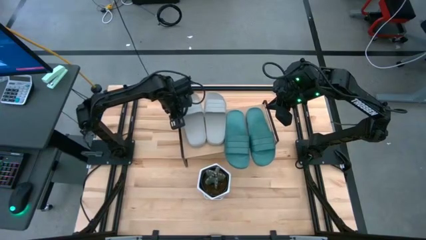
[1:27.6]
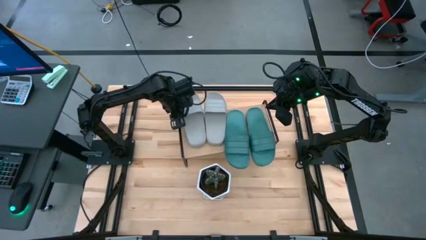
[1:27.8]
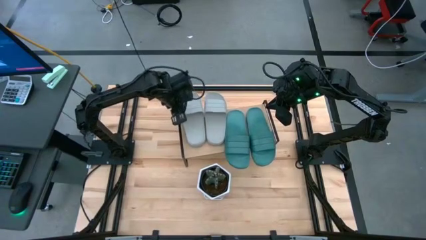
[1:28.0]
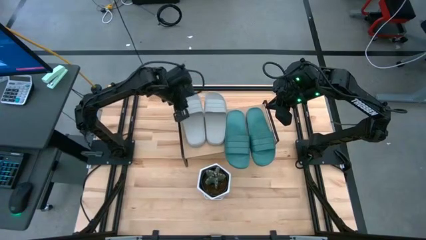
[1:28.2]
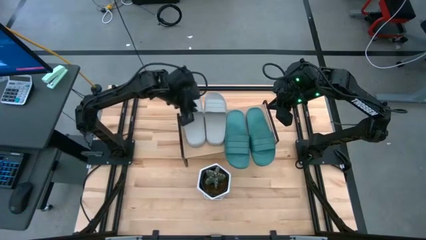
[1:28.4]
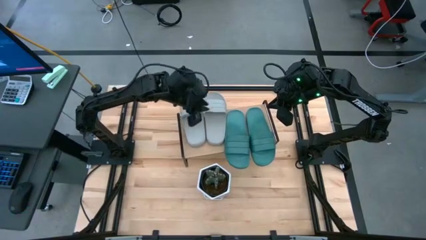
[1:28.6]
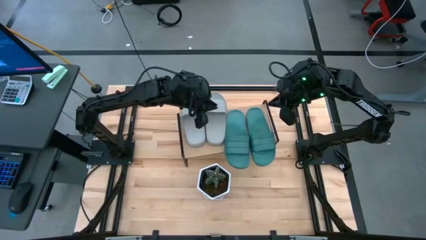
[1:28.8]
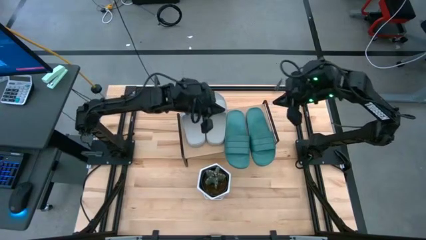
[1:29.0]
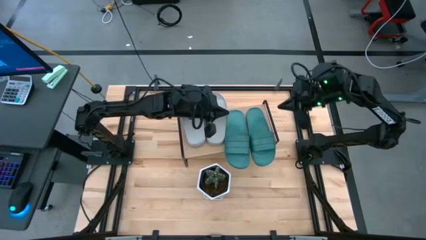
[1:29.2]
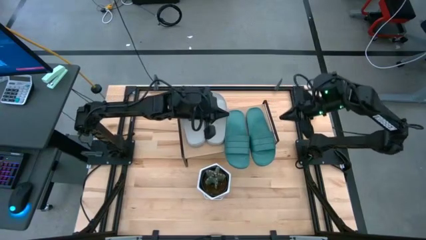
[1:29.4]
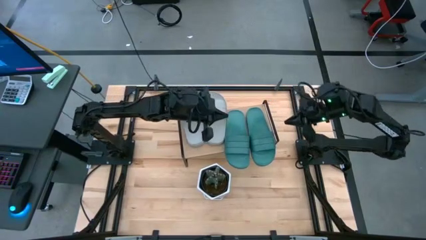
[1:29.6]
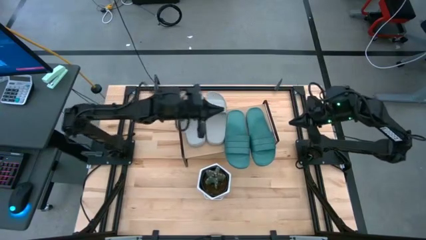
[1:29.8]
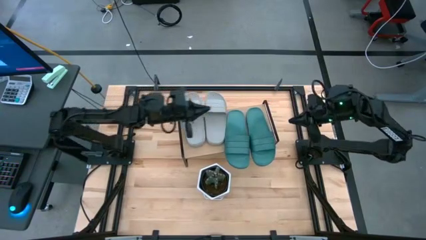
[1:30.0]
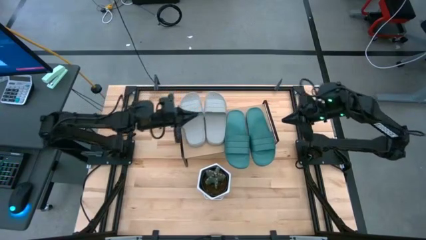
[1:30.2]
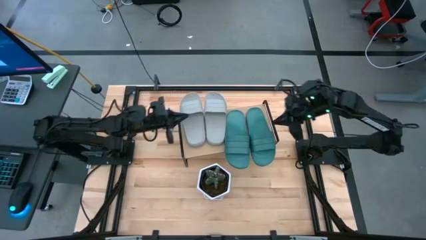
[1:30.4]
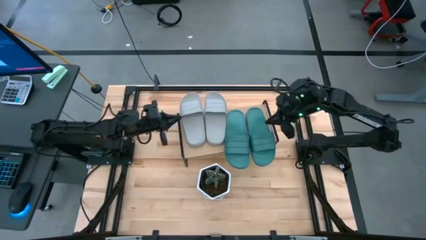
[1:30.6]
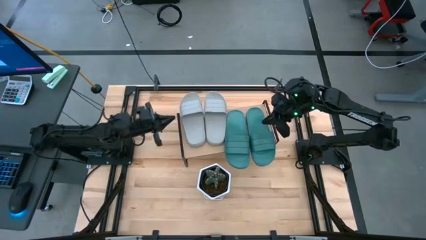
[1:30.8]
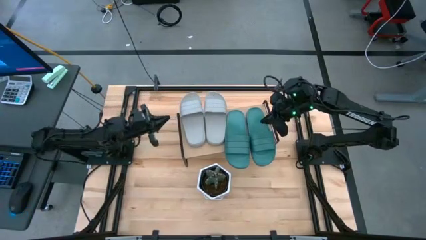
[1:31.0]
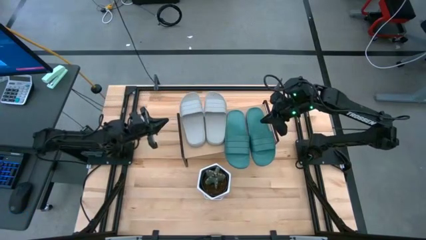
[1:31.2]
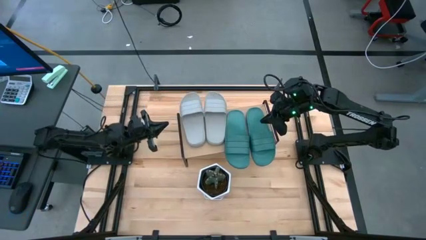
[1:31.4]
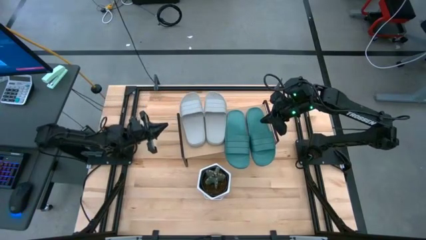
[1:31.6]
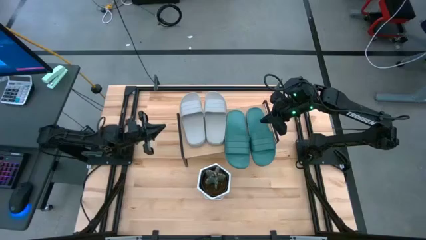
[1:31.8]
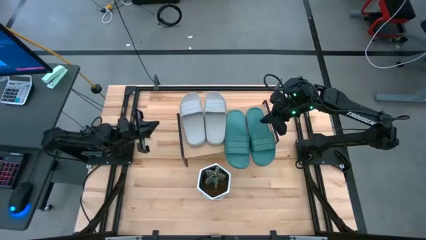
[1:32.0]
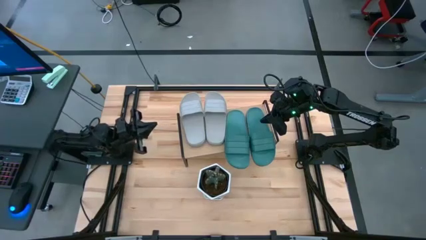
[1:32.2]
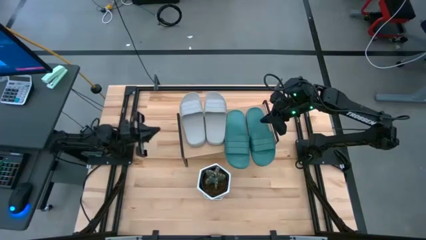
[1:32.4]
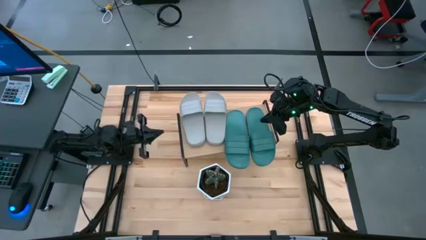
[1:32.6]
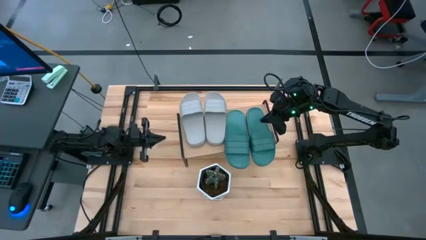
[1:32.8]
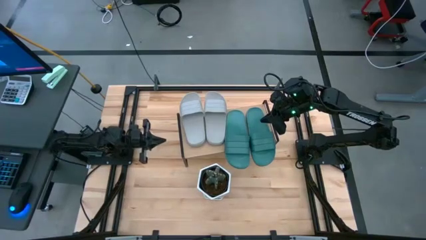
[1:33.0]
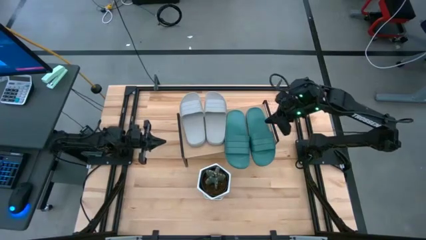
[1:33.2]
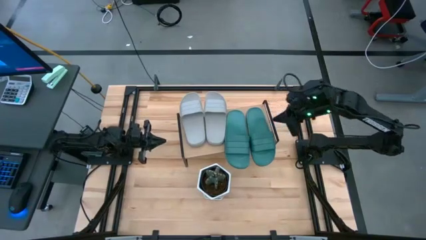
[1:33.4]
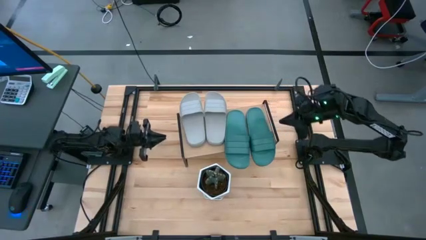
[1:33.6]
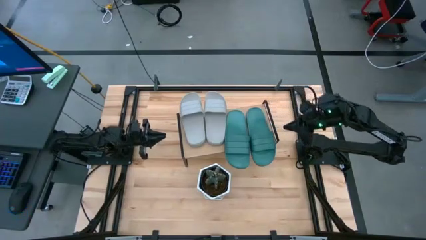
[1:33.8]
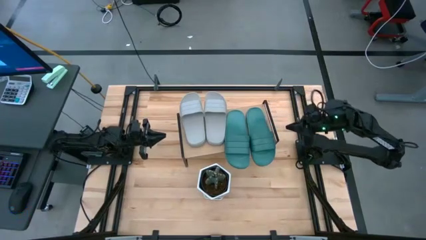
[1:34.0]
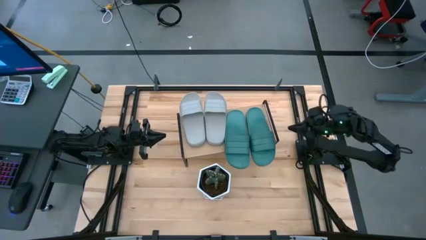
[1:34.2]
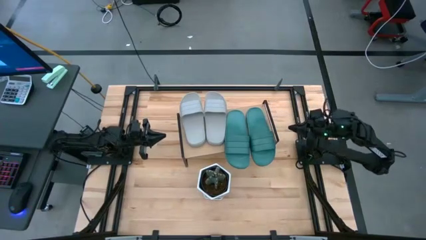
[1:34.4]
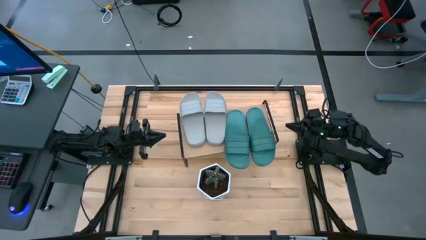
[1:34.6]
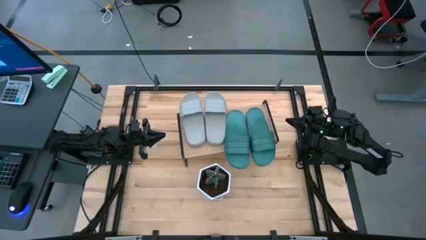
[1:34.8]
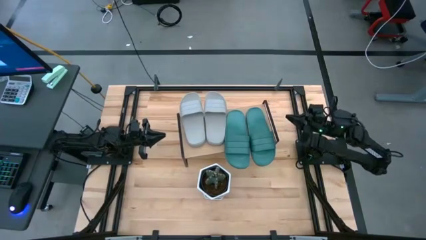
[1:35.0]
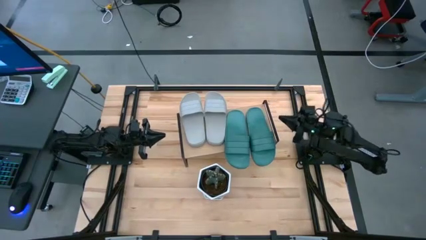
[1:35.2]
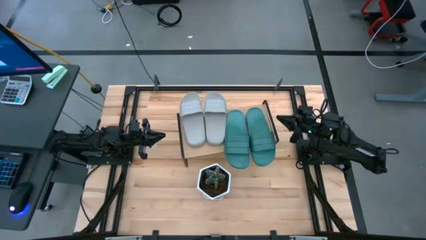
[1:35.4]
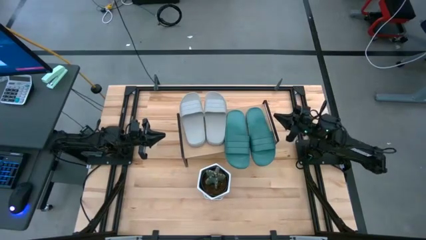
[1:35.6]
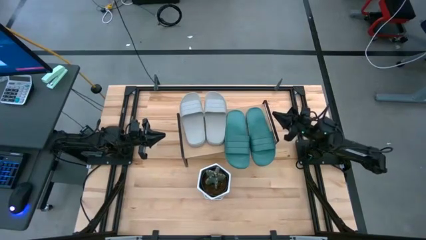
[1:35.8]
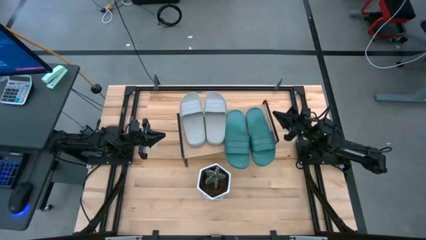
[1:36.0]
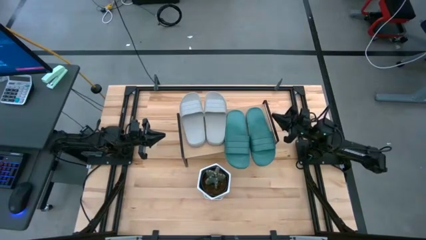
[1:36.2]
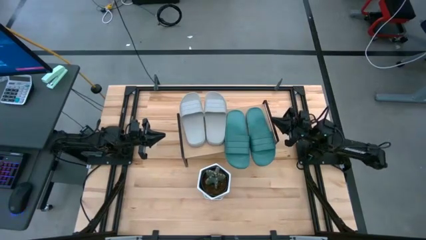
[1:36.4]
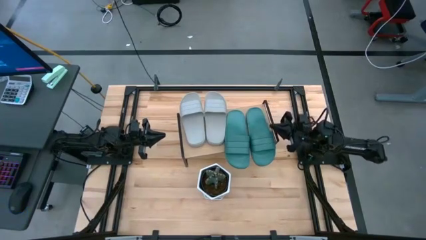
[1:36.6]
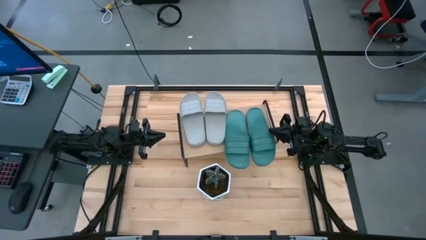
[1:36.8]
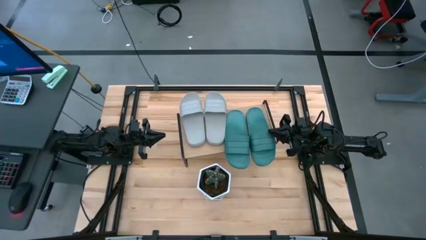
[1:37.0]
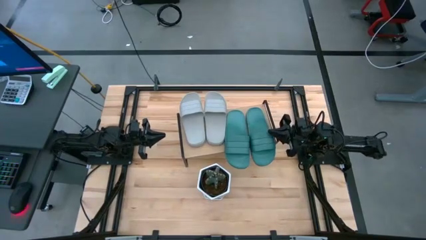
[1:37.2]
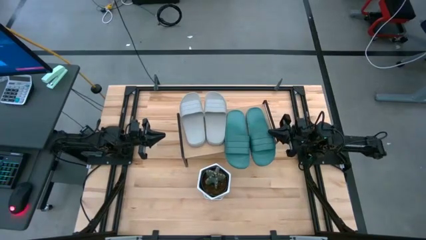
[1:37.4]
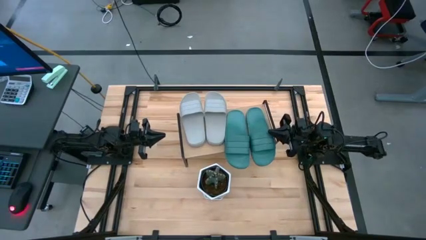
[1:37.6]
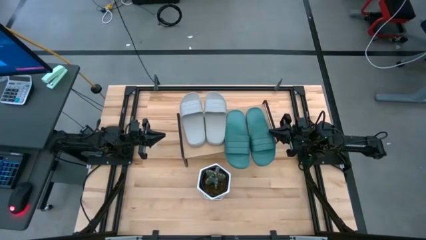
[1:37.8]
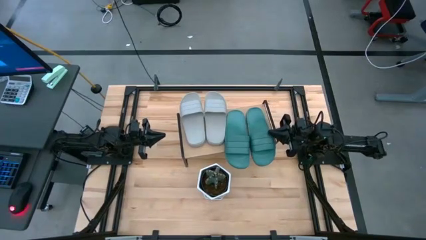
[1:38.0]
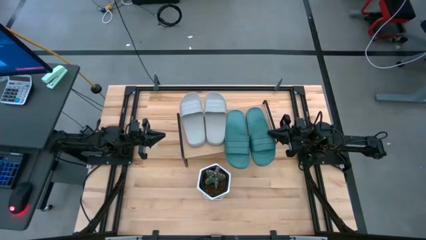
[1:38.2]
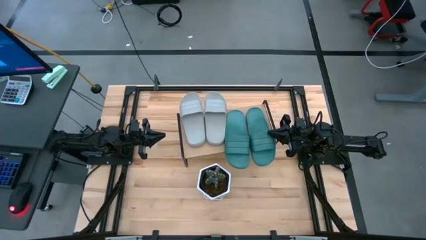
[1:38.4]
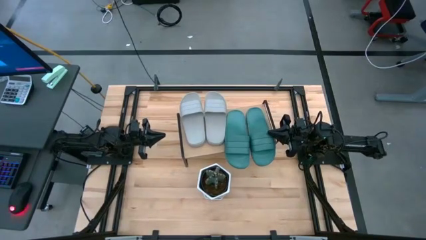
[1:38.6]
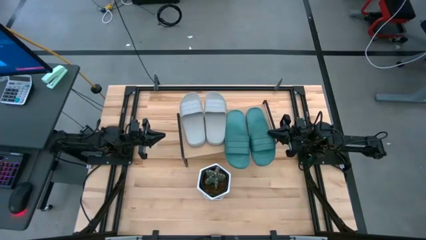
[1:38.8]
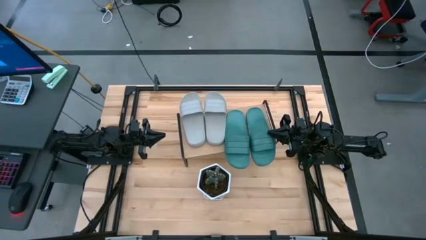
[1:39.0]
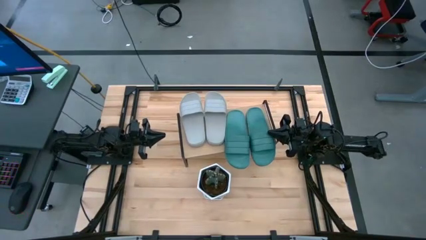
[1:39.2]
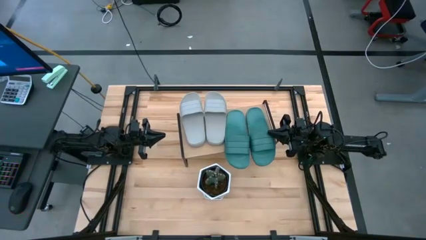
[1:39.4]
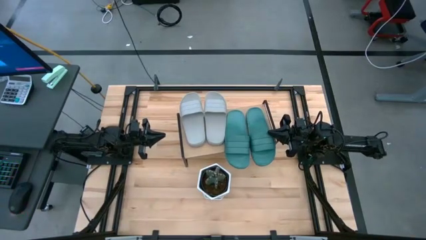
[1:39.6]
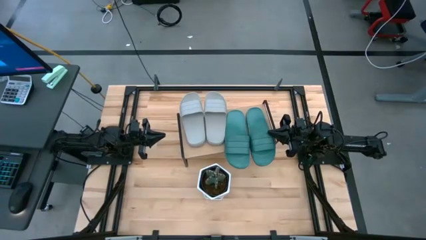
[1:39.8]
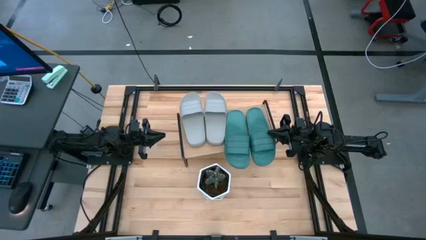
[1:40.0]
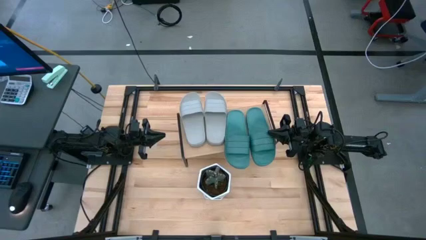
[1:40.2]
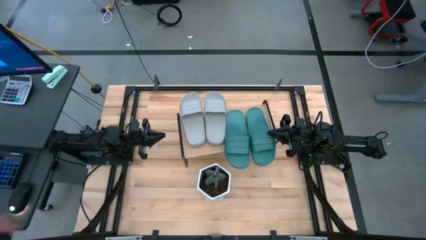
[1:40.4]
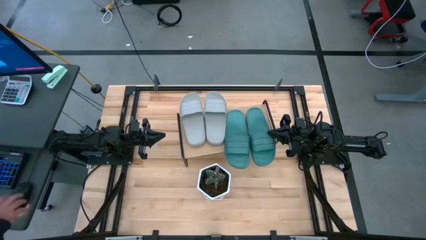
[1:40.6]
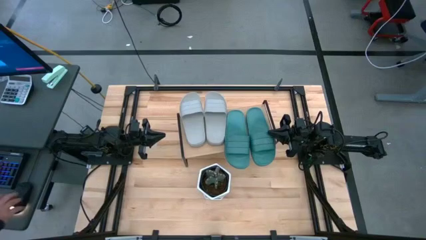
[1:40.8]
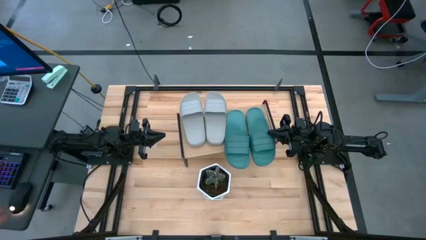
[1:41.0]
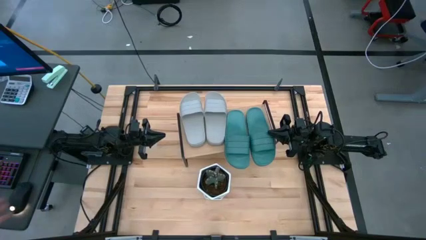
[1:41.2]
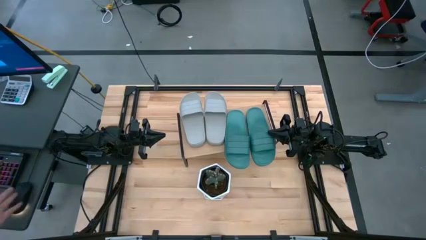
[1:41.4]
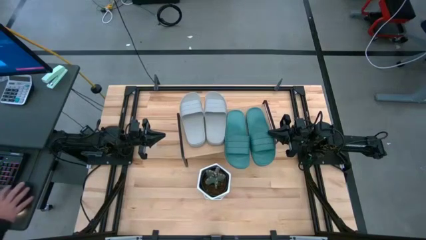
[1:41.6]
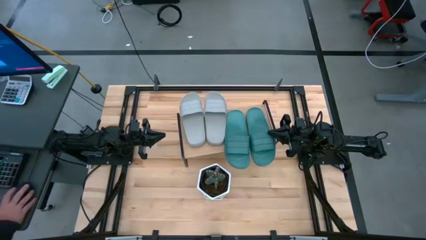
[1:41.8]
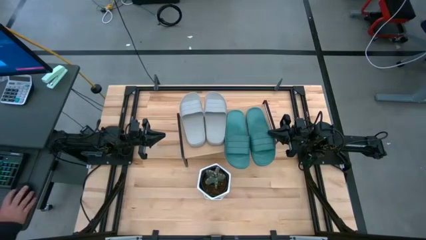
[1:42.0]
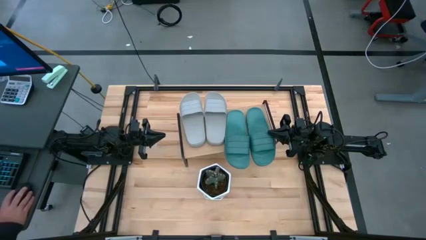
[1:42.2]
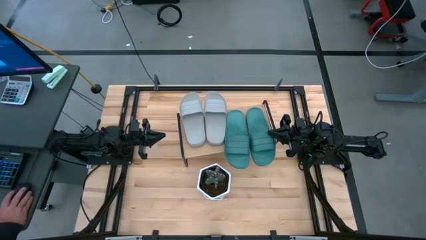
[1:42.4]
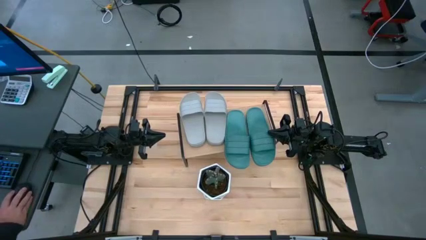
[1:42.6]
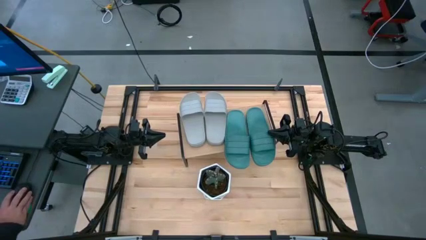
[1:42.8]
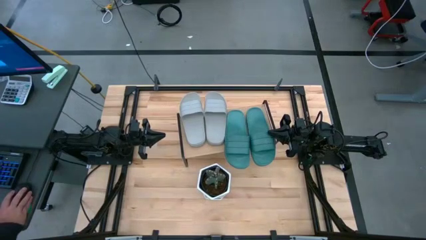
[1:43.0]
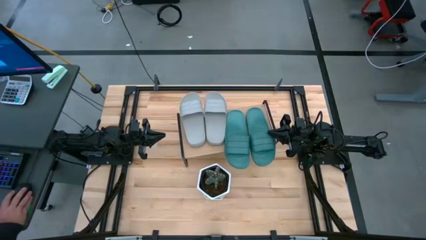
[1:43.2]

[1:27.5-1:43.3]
Task: Pick and place slides into the shelf
Return to Home Position
